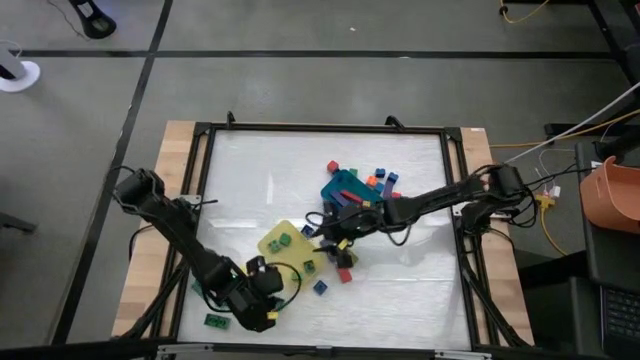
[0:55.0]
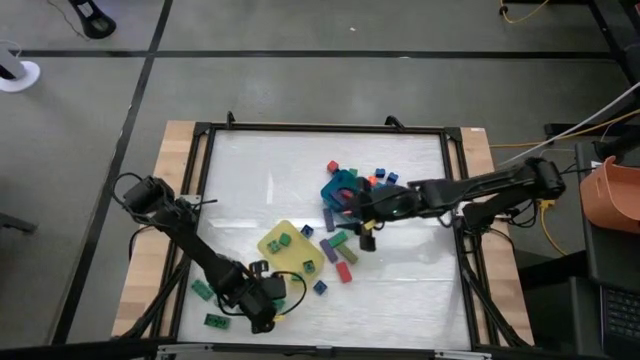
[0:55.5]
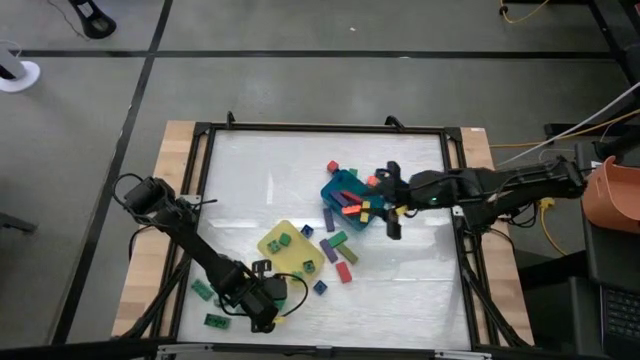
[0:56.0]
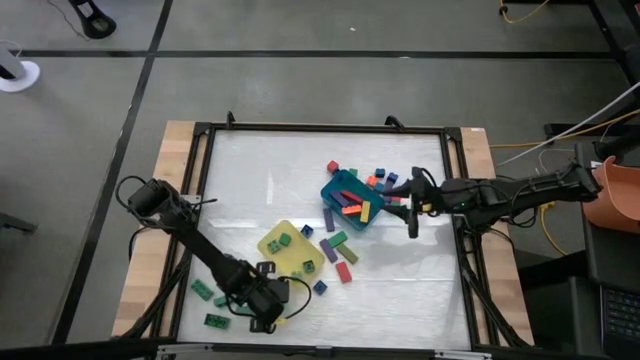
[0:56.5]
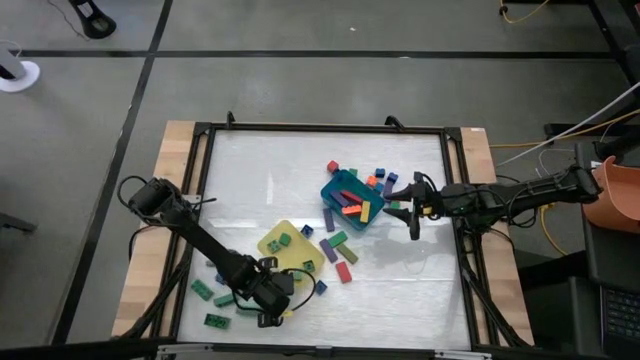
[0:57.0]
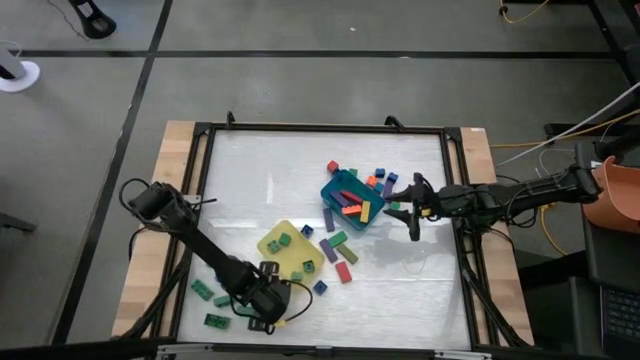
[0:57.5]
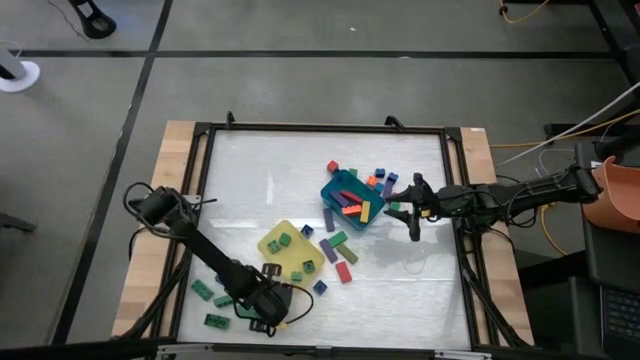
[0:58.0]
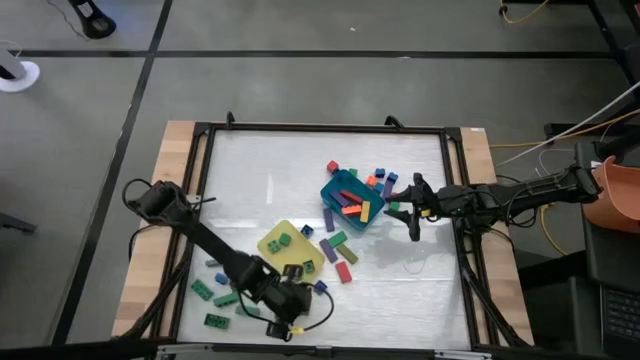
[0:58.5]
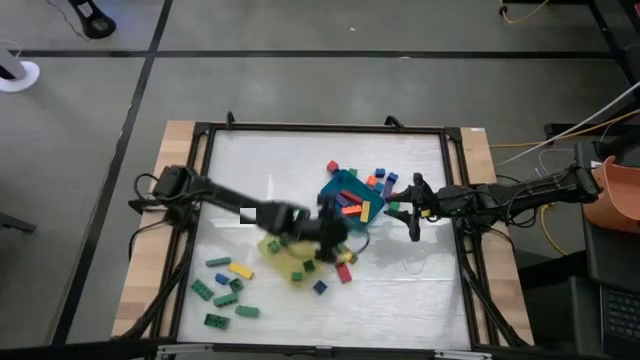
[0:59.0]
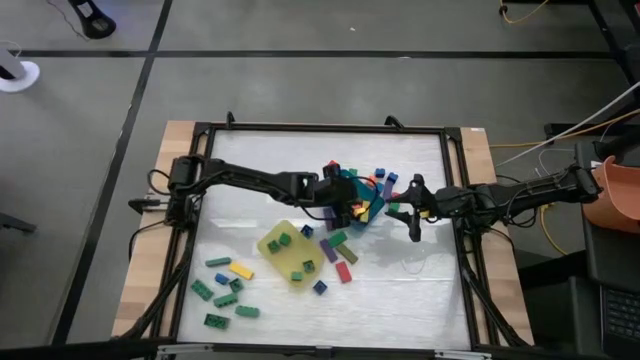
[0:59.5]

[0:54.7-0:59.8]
Task: Sort blocks by size
Put the large green wooden block into the blue bin

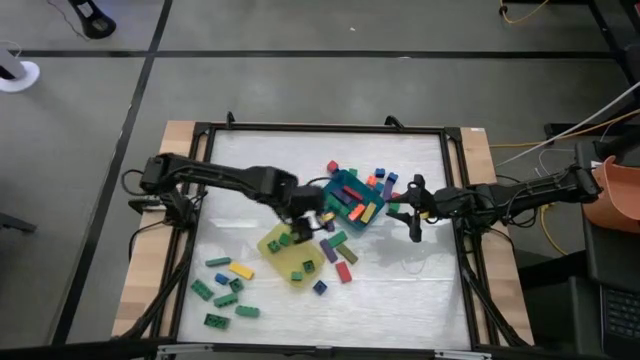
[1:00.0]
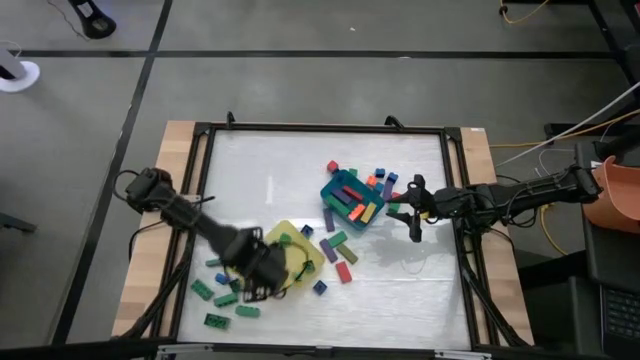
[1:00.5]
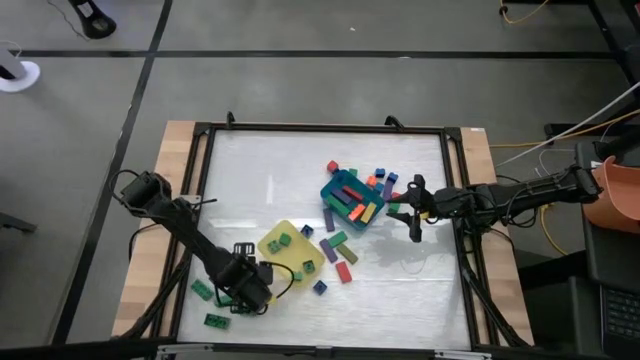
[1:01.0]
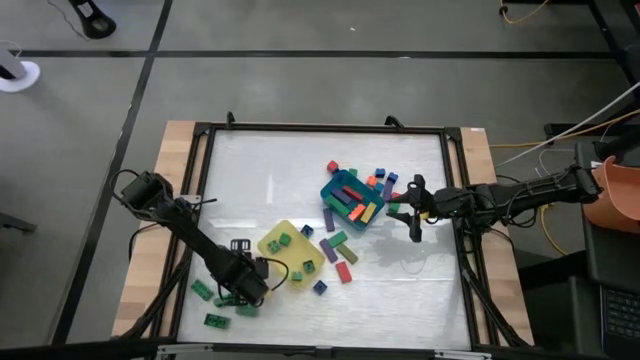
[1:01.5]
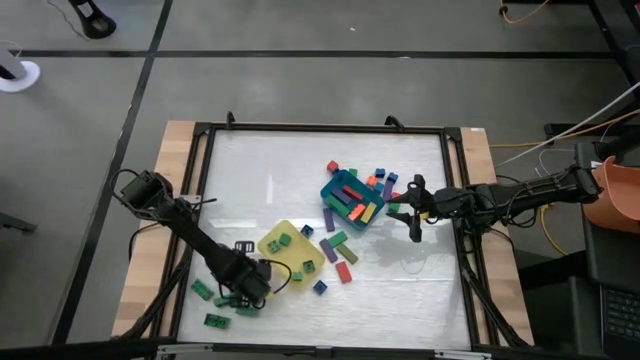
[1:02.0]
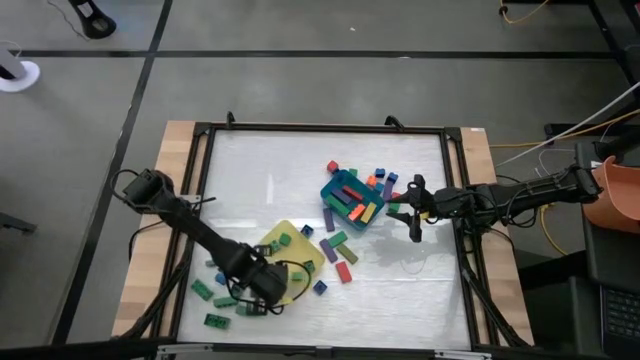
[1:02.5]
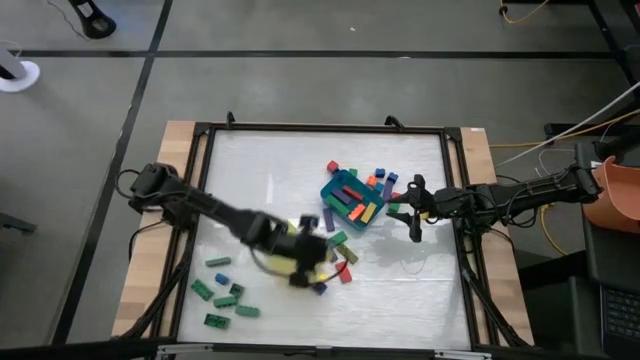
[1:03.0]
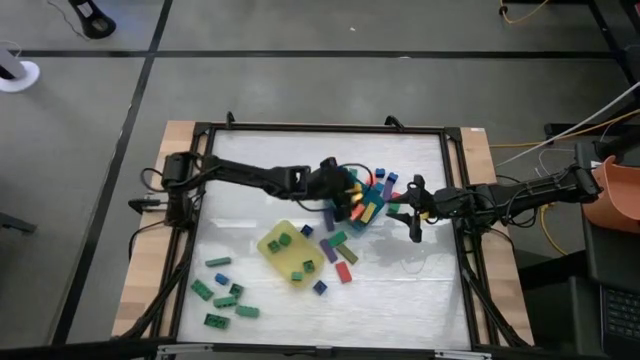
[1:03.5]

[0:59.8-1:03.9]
Put the large yellow wooden block into the blue bin

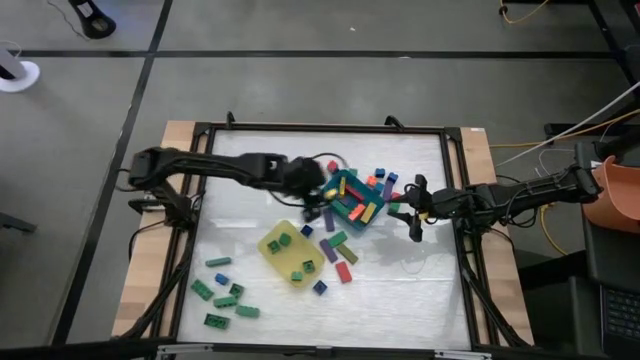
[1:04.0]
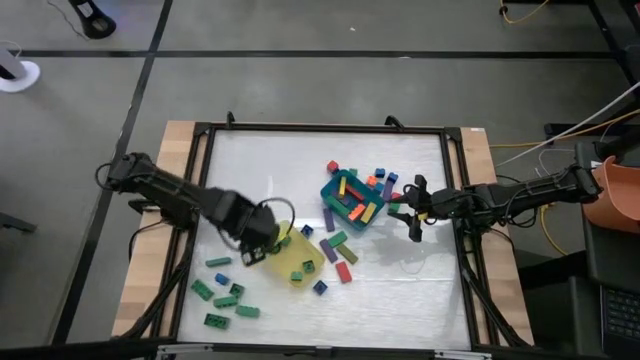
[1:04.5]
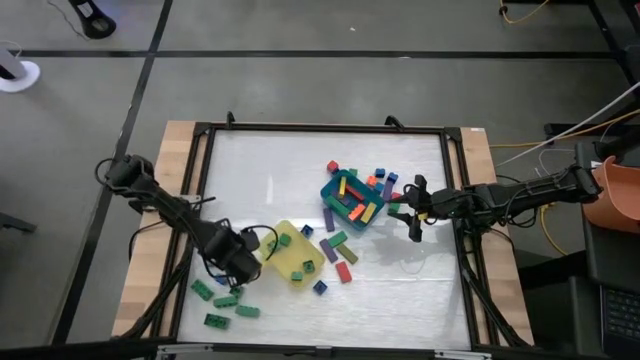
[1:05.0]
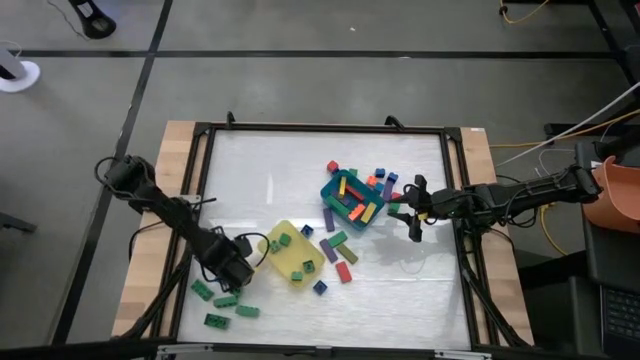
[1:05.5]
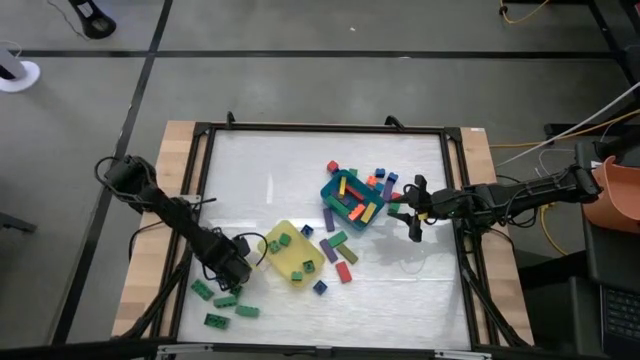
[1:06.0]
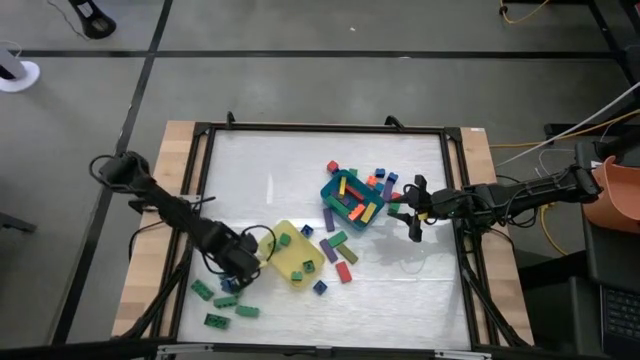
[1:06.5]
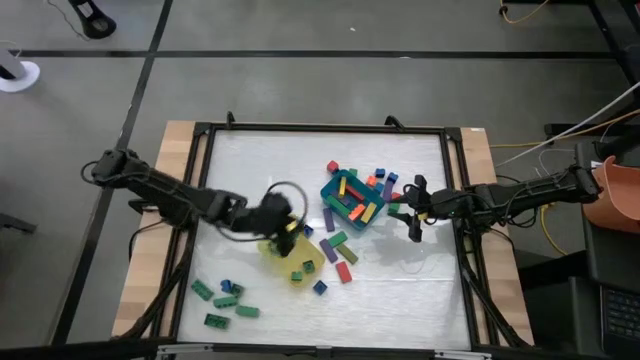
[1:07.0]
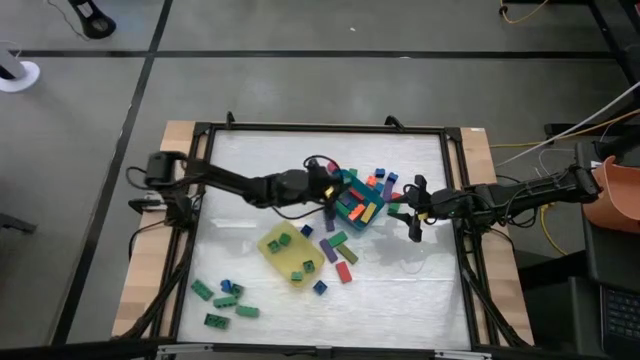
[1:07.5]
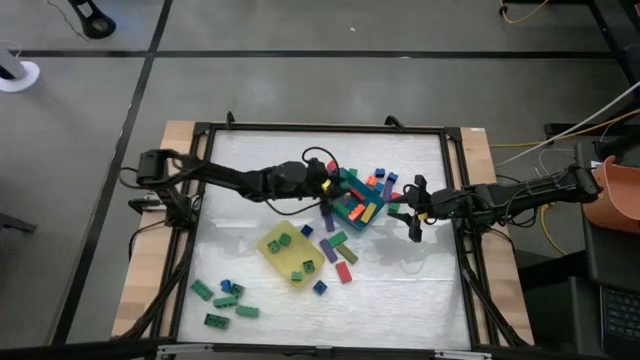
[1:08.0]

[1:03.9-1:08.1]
Put the large green wooden block into the blue bin

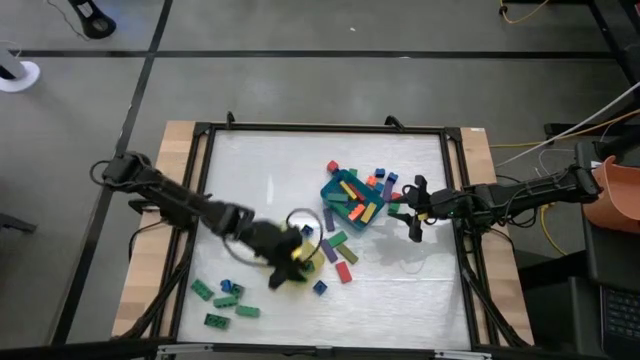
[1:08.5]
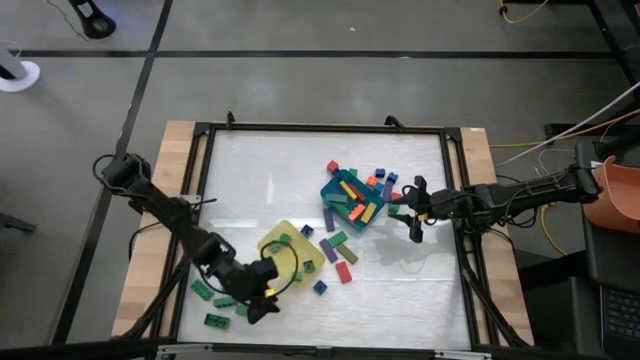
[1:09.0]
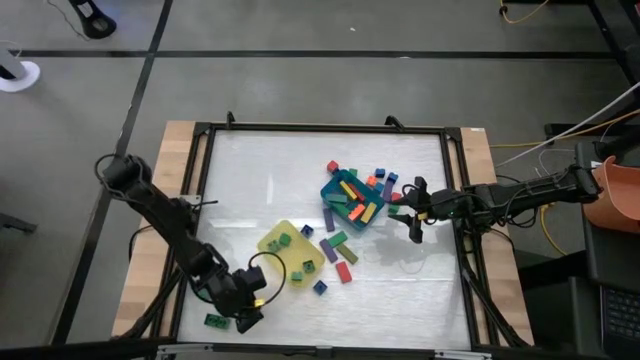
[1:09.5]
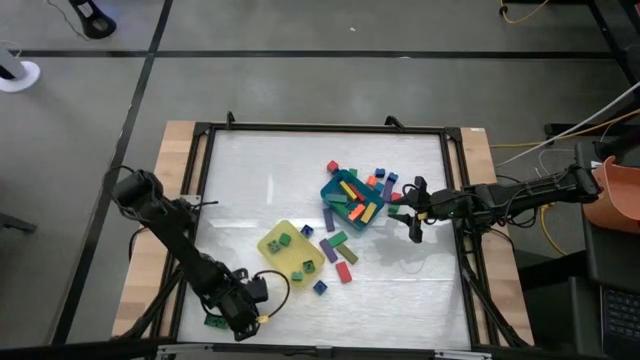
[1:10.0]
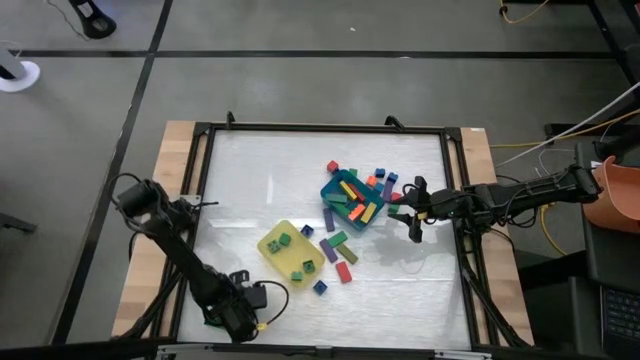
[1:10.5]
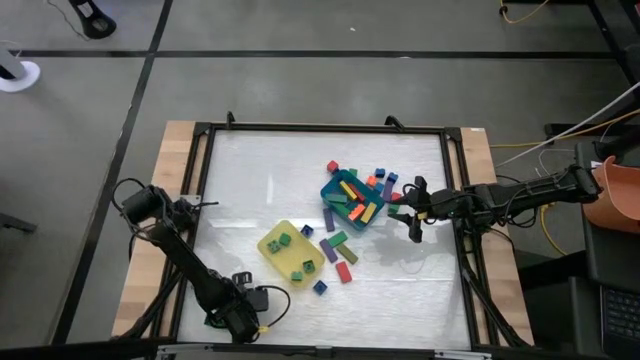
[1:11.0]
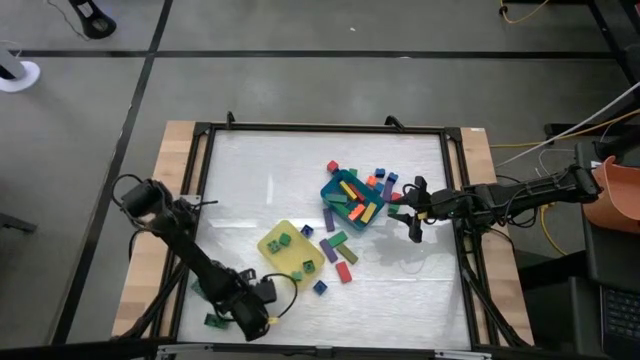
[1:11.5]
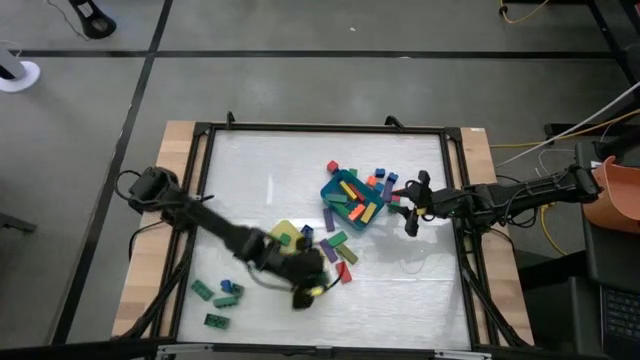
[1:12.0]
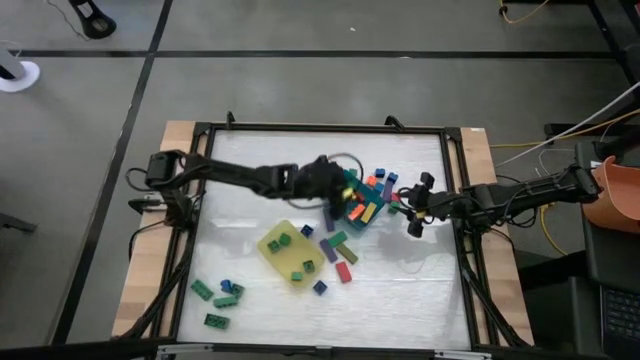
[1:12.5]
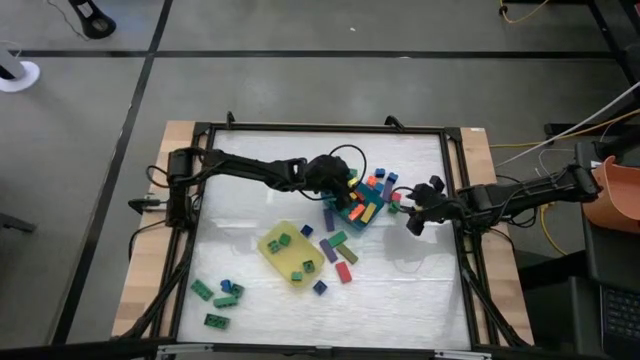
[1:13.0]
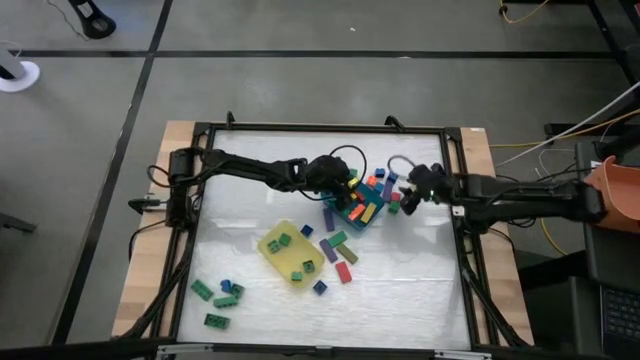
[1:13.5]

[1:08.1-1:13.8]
Put the large green game piece into the blue bin

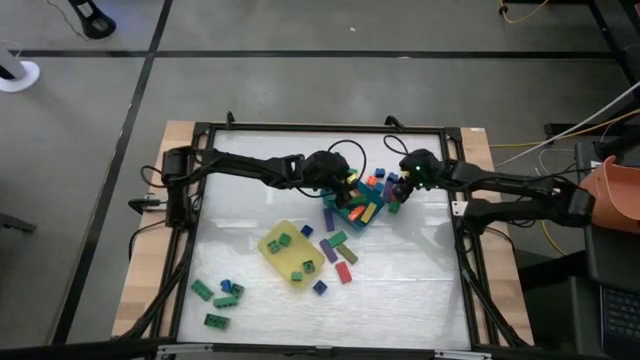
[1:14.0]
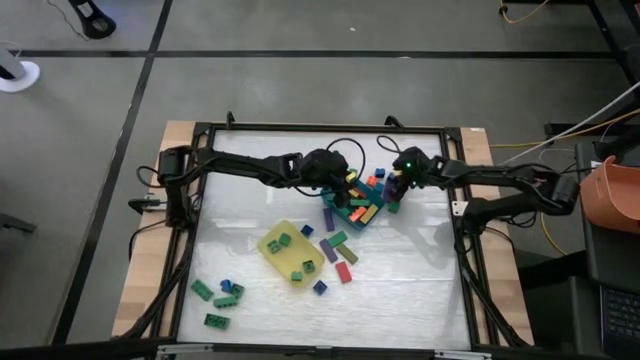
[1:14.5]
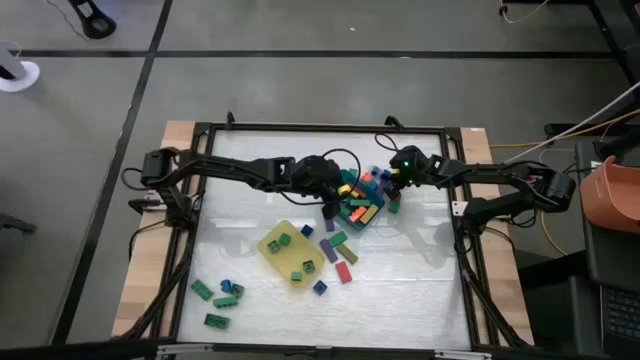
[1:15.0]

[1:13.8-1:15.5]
Put the small blue game piece into the yellow bin
